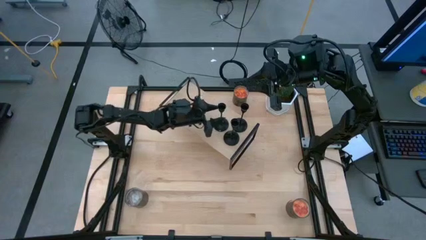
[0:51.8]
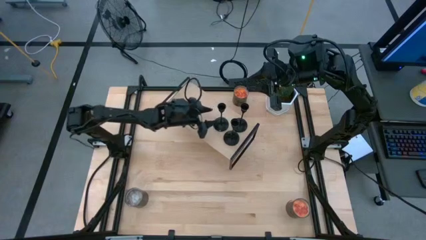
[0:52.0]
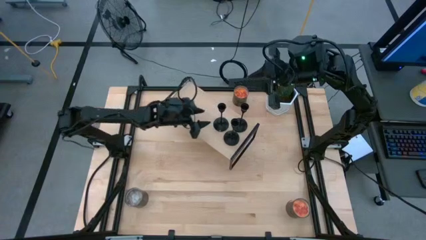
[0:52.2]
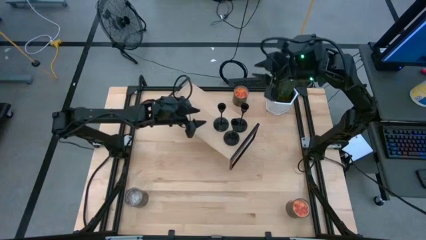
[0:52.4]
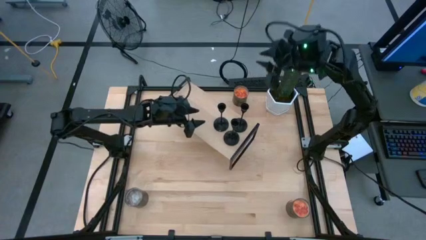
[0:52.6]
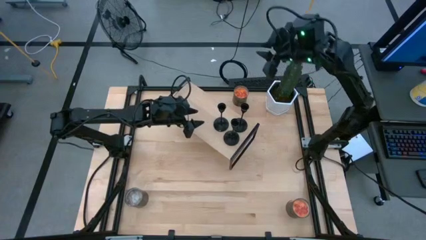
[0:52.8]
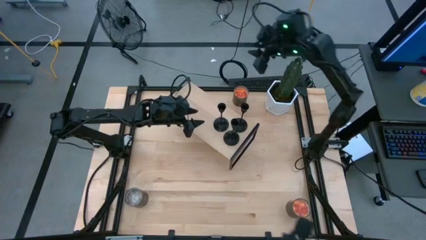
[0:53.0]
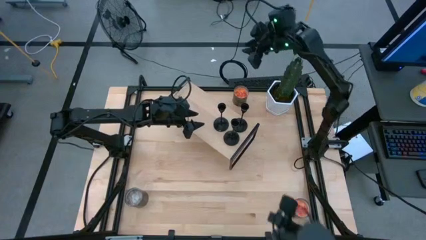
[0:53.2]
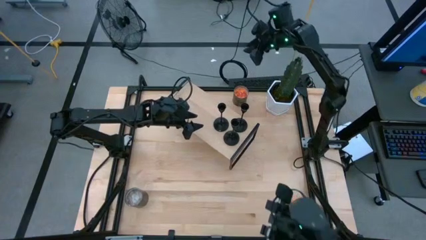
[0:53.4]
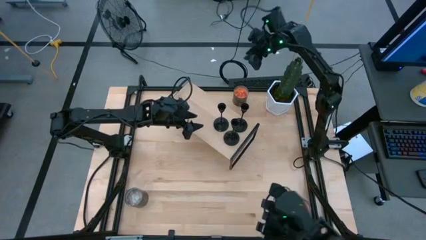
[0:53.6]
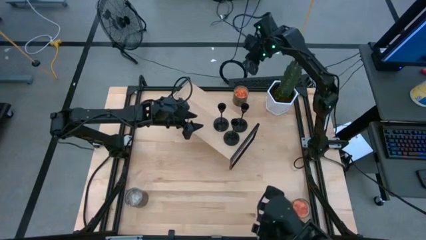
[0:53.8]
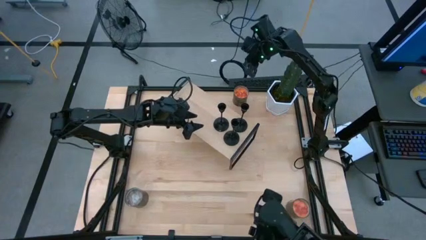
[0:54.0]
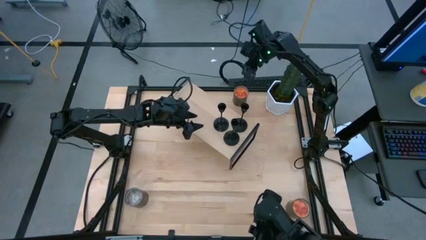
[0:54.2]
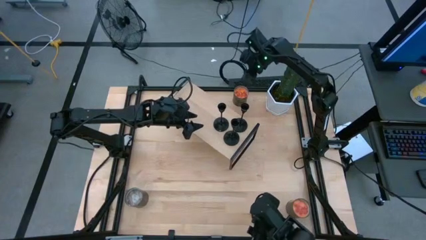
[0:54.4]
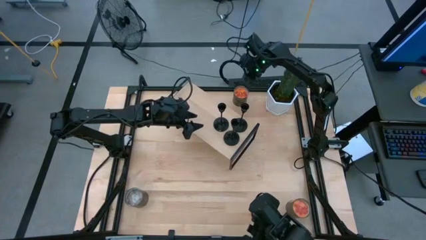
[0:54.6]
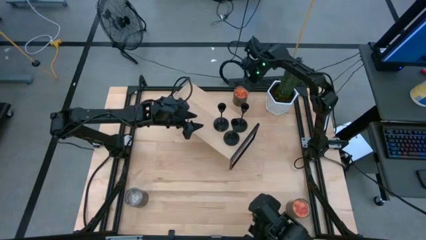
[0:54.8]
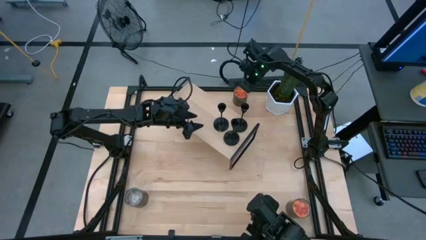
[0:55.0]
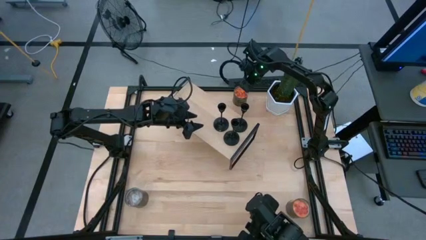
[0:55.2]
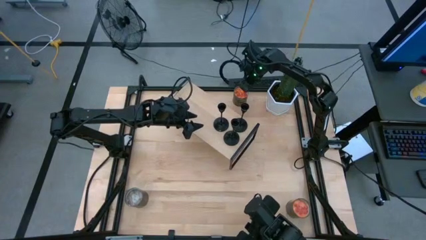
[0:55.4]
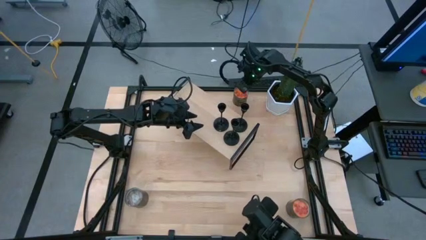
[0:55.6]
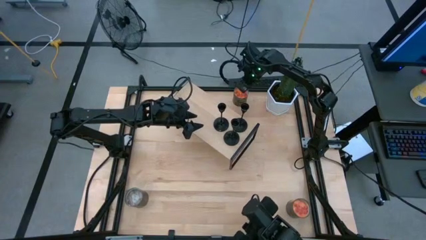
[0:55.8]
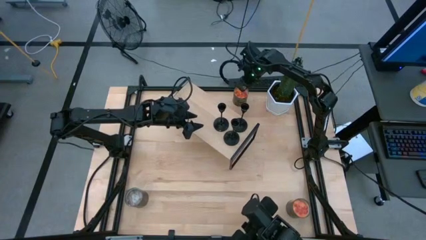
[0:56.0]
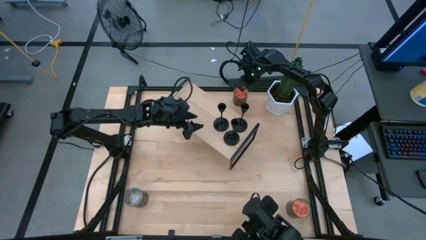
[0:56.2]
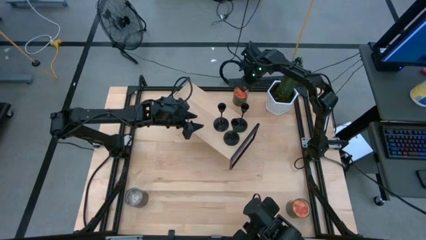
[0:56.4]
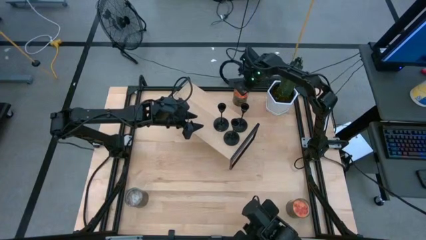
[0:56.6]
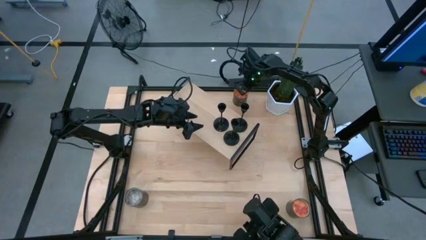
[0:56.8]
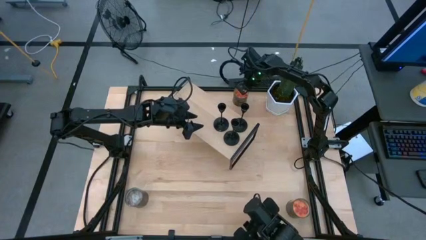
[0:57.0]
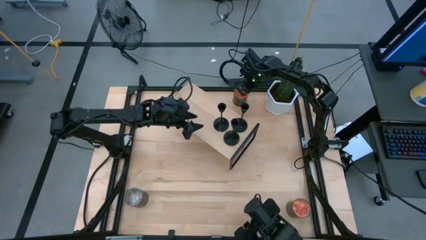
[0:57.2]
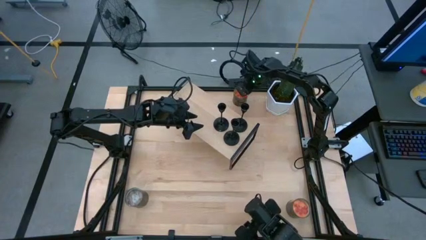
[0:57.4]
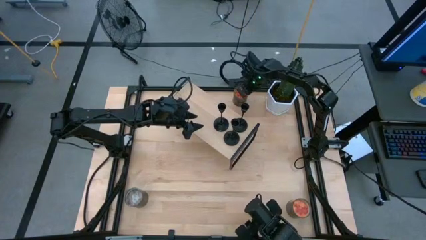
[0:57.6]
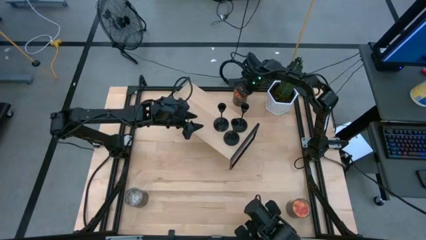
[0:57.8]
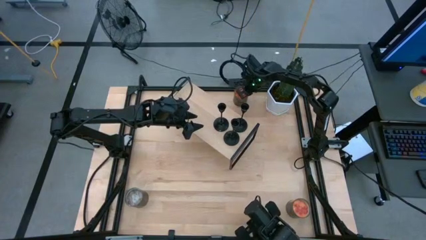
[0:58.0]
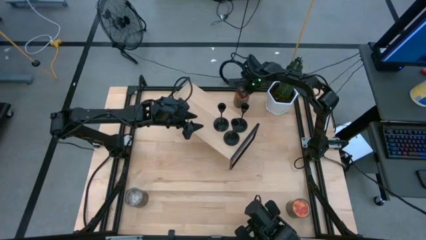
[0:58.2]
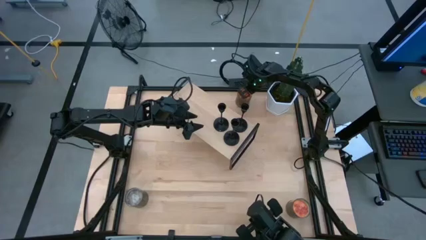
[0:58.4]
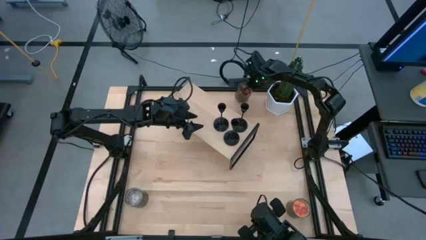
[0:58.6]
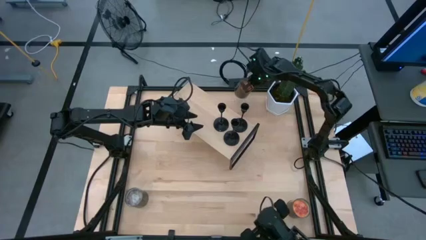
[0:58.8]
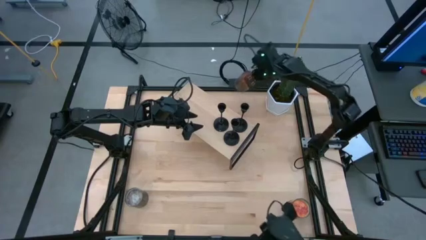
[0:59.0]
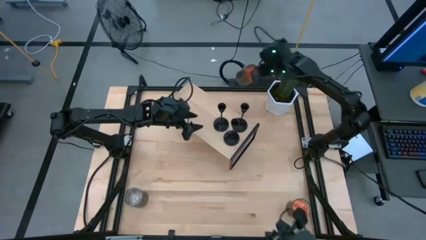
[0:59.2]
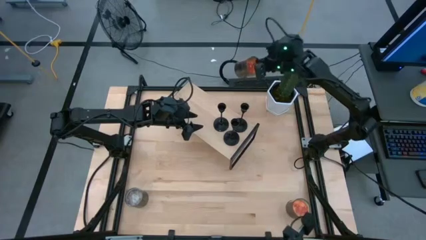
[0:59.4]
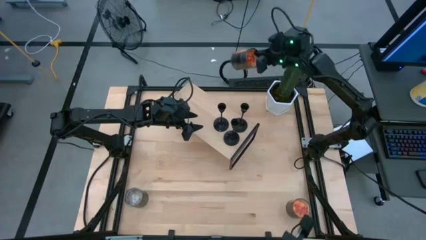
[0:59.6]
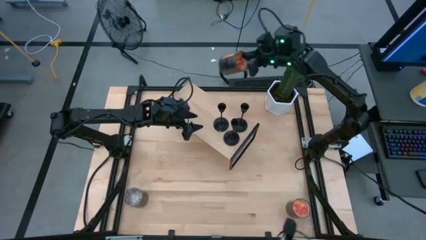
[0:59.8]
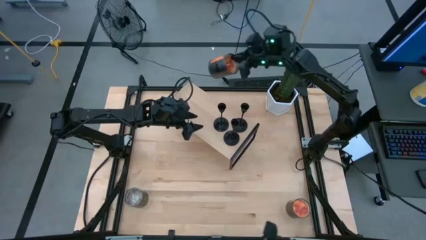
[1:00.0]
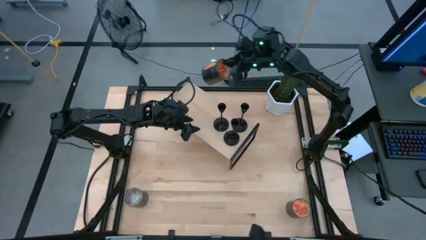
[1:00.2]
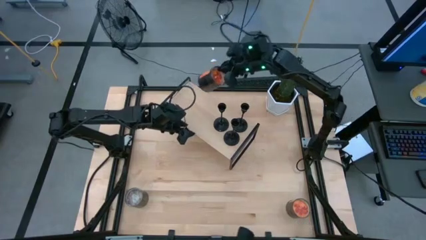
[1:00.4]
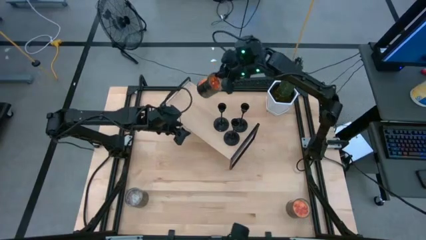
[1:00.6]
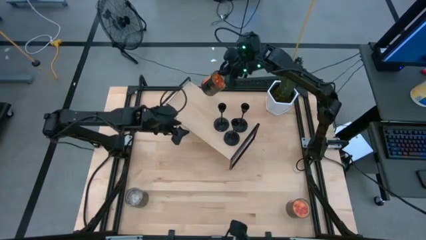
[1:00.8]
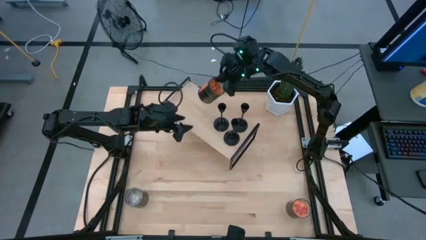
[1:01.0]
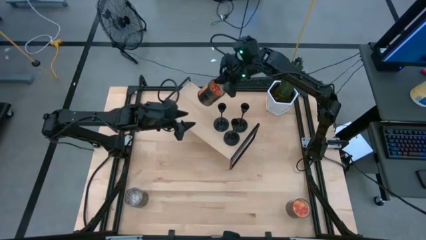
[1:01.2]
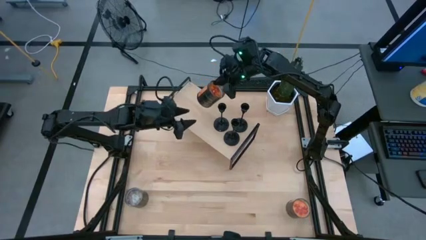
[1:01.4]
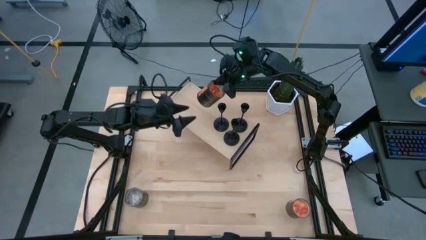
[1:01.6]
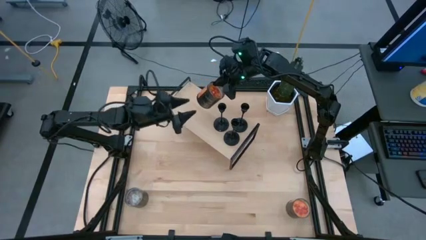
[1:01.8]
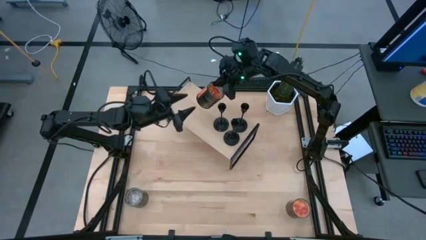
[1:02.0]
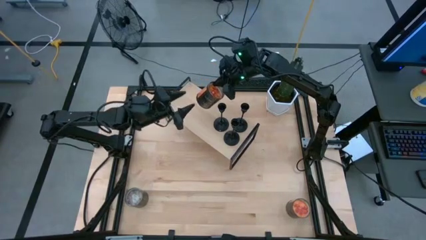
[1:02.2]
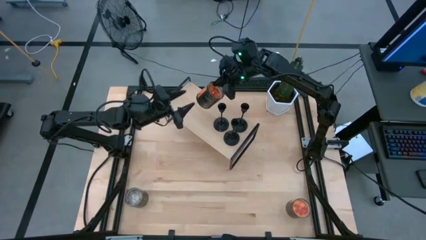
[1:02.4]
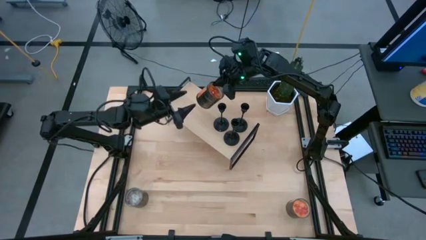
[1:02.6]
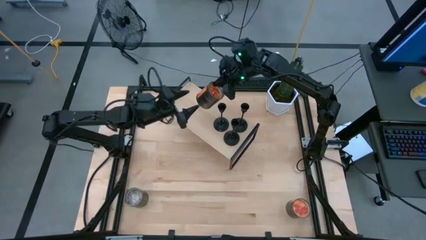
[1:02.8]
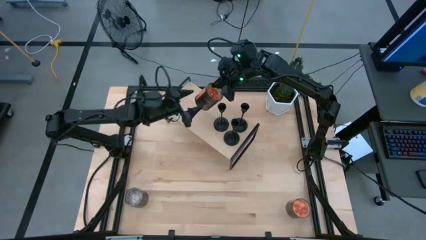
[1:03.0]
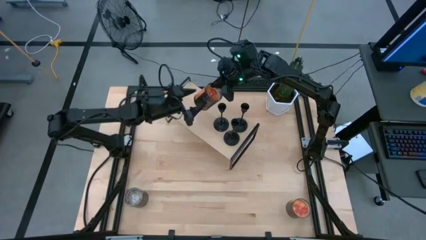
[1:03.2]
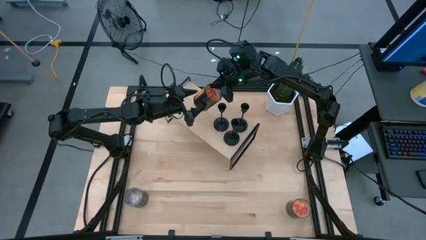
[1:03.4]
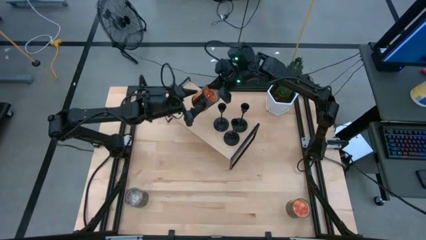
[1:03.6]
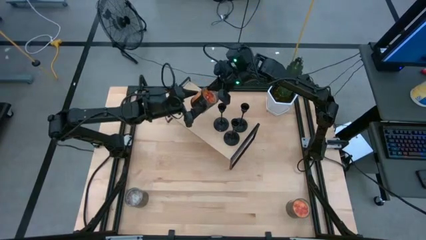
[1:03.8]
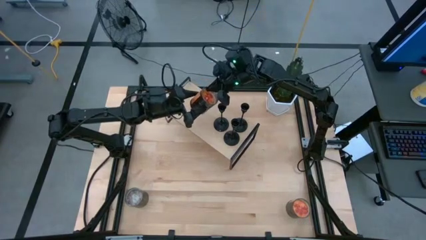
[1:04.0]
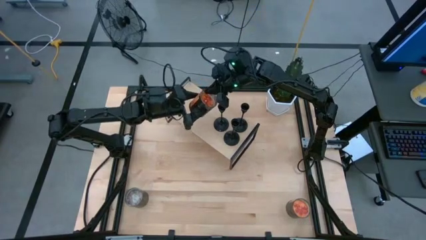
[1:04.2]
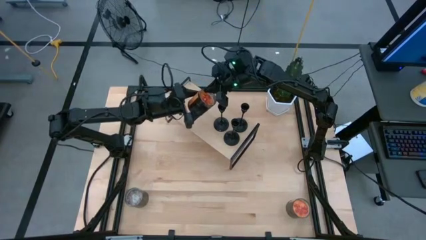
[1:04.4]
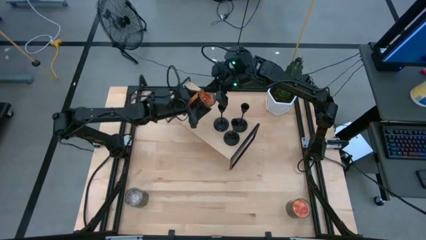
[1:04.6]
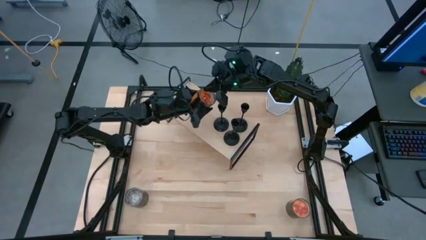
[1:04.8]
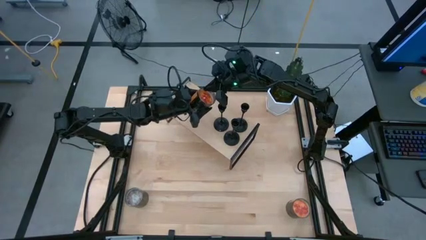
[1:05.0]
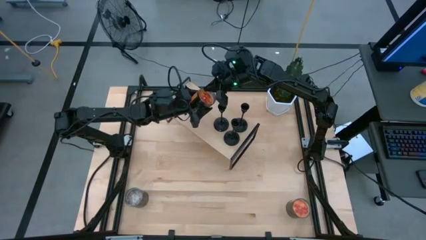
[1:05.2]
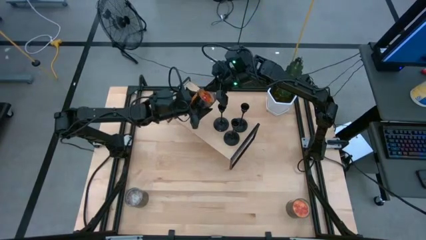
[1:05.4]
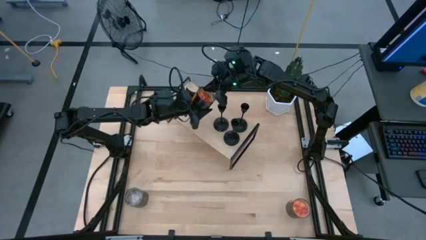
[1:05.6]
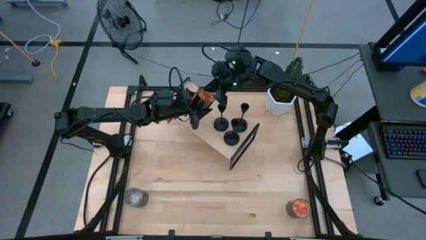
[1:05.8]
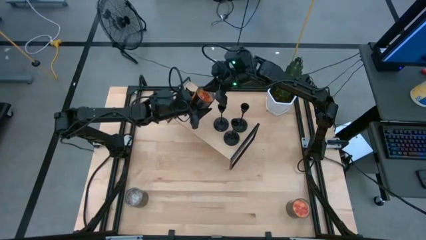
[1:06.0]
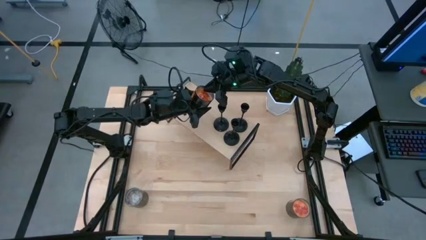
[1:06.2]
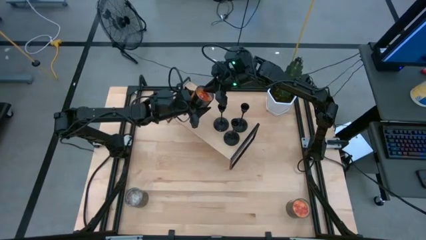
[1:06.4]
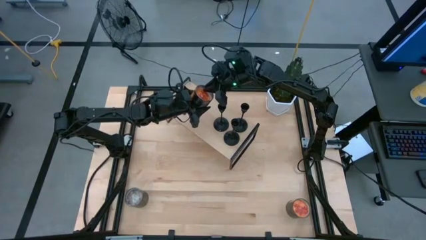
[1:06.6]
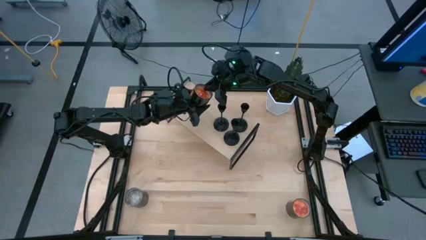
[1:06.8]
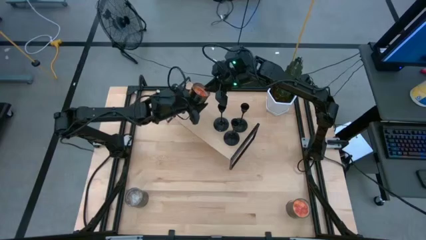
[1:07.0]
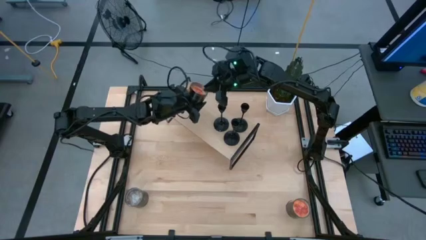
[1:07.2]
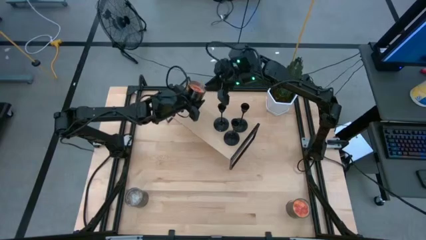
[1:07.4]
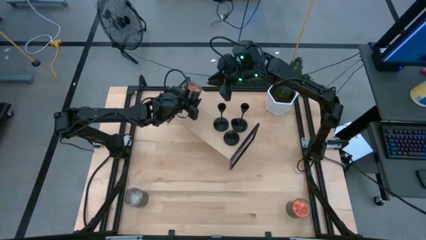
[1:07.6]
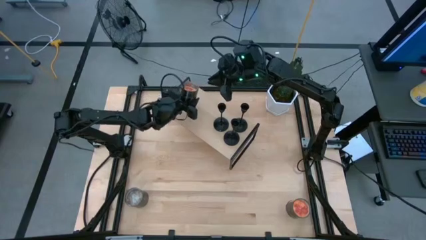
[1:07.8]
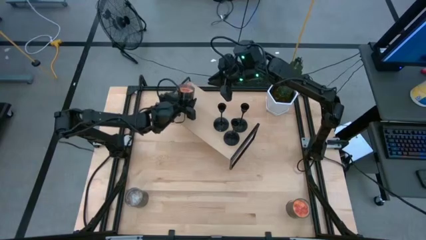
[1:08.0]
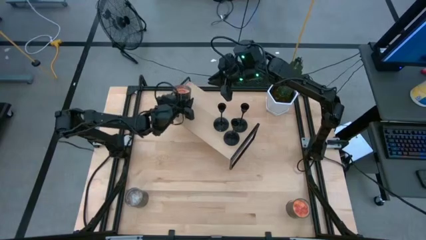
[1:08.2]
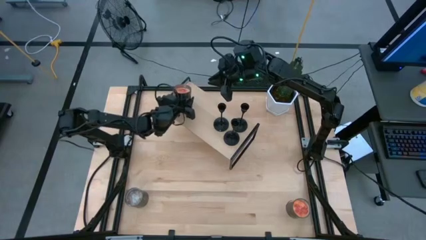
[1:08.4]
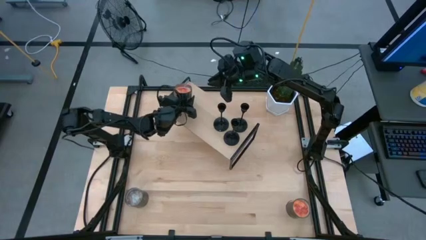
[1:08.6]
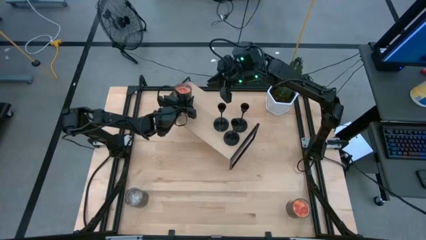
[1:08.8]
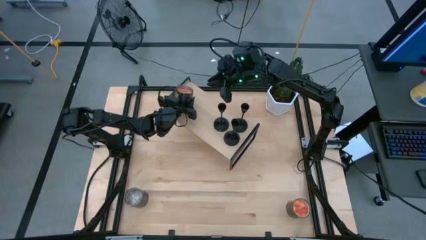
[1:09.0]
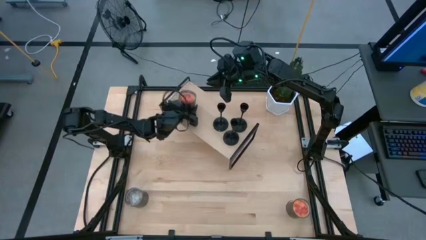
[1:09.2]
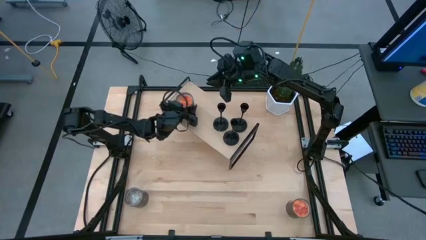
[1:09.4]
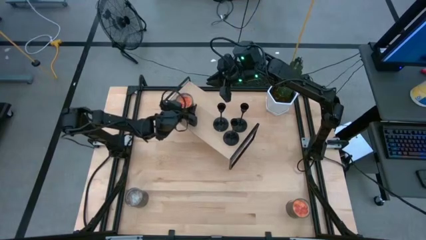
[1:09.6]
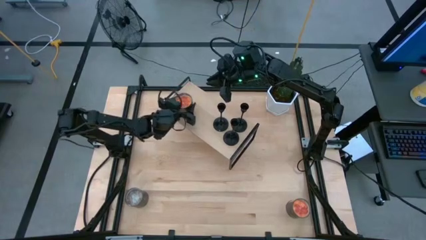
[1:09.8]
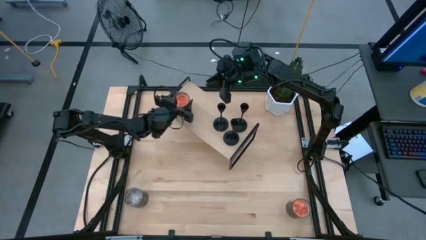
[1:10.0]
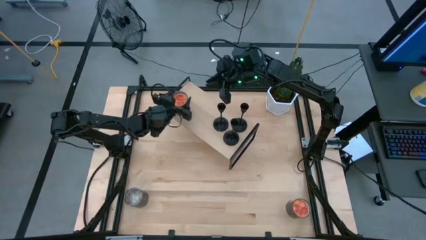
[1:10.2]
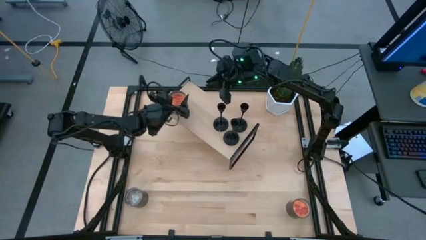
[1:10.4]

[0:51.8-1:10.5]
Task: Pick & Place candle stick holders
Put the top orange scented candle on the shelf
